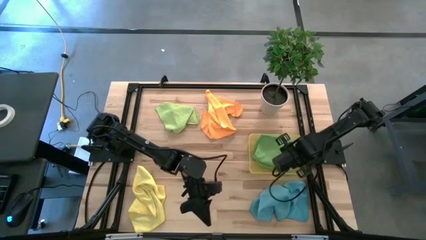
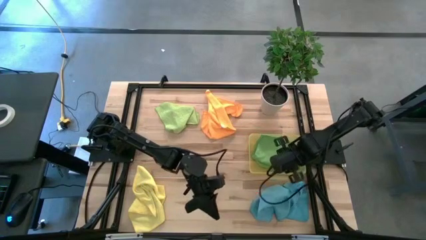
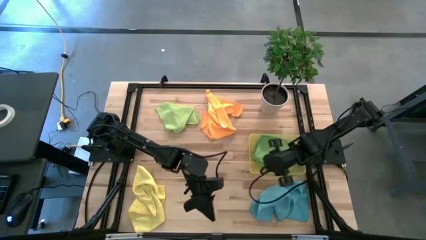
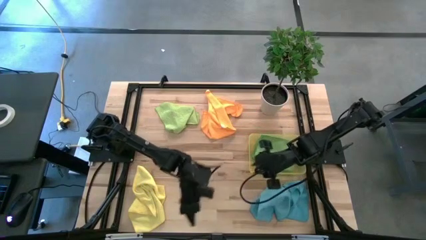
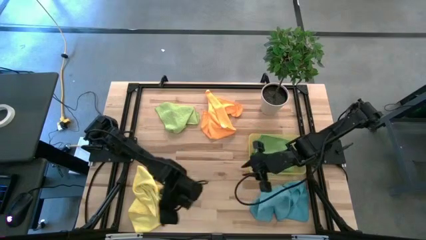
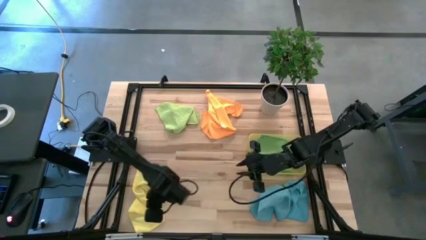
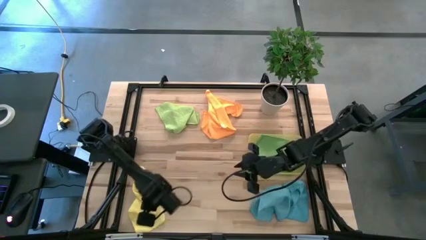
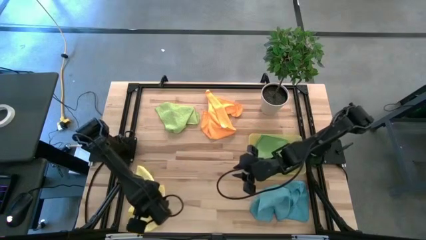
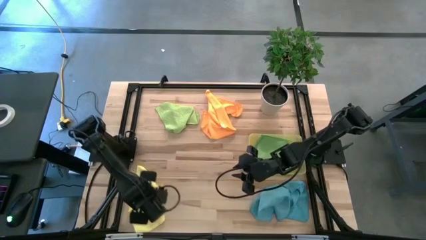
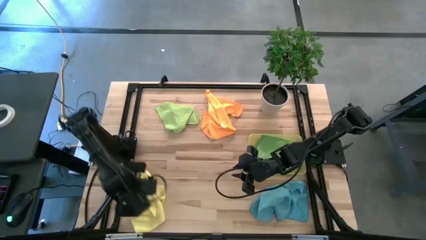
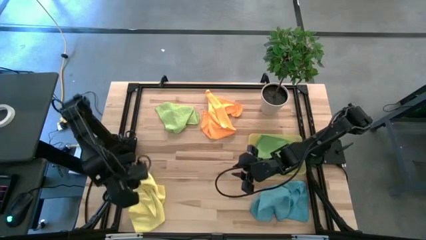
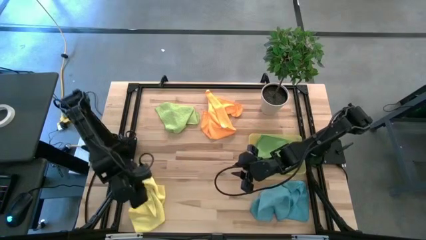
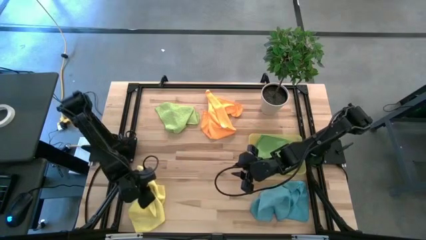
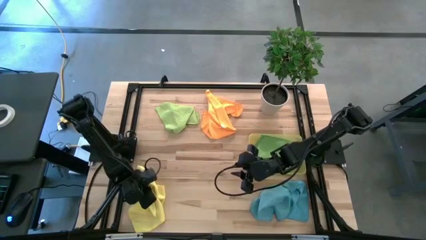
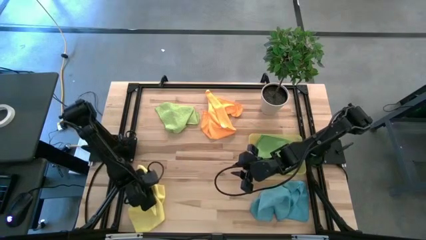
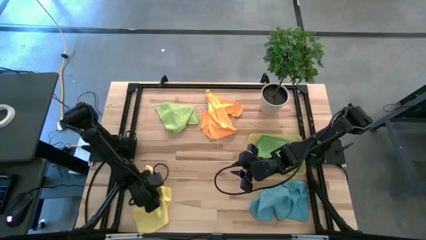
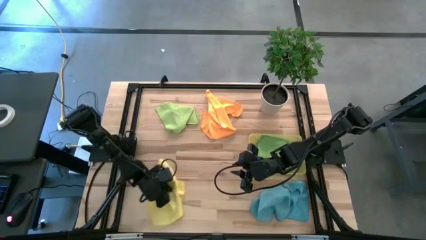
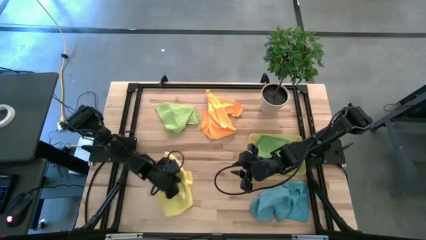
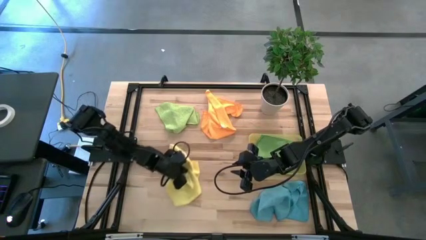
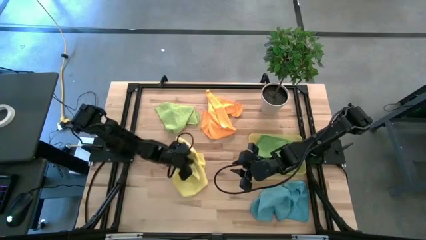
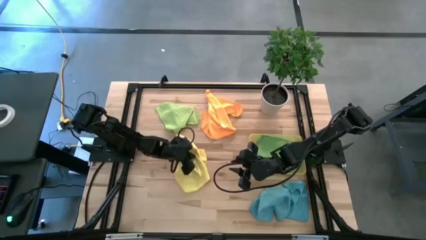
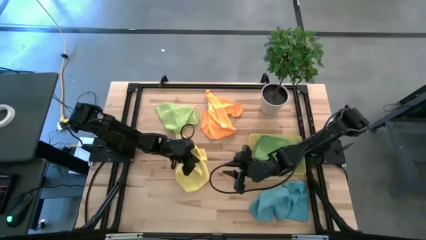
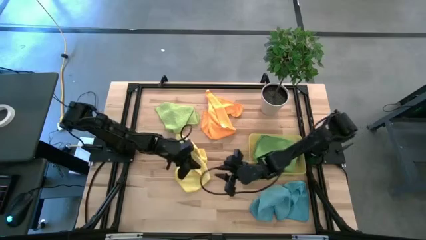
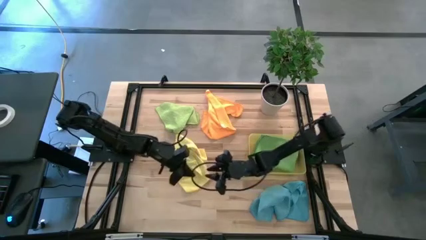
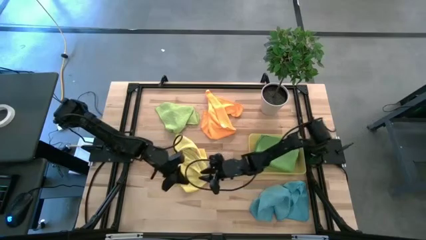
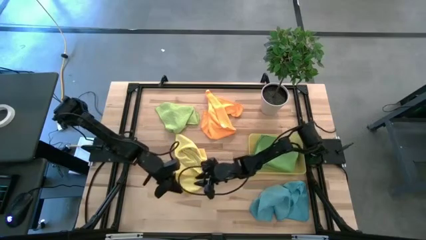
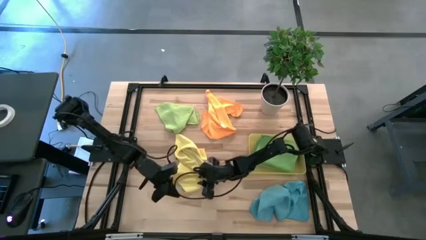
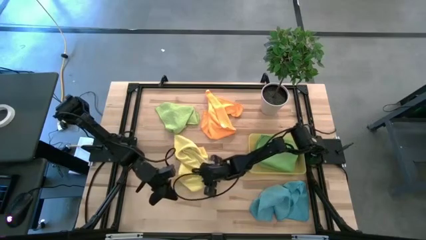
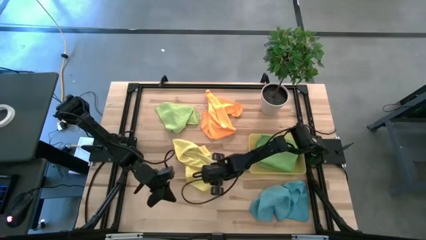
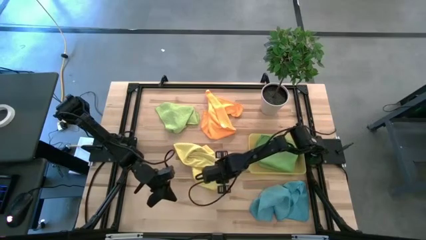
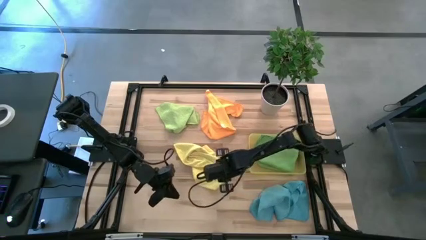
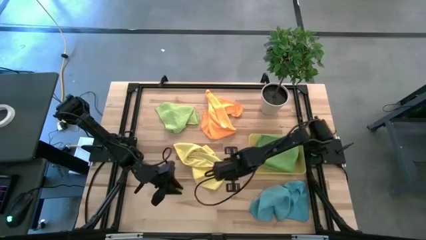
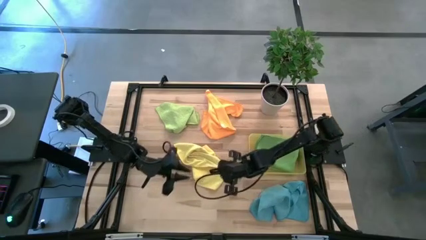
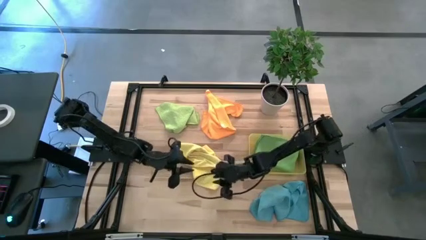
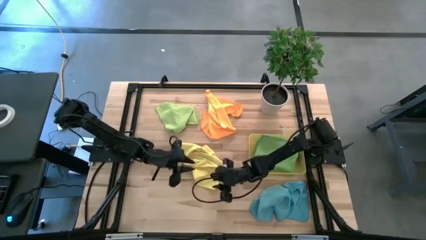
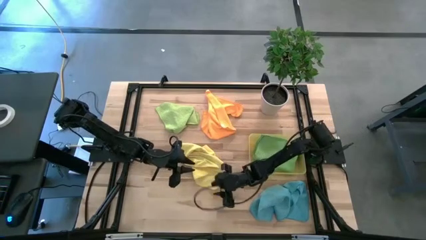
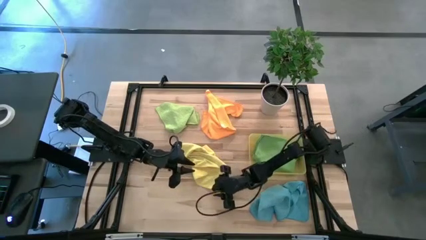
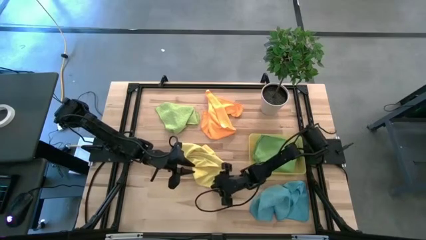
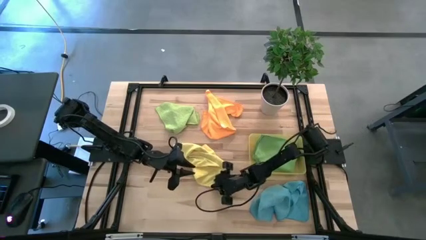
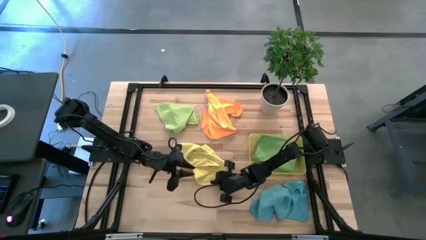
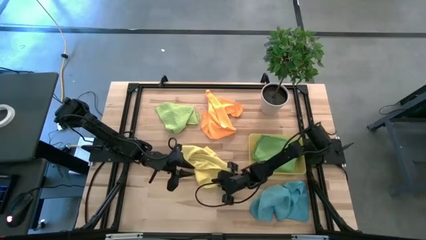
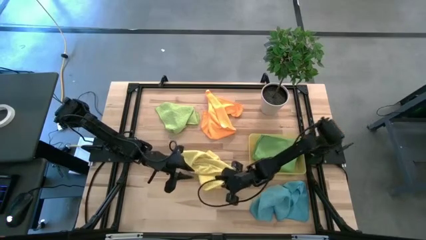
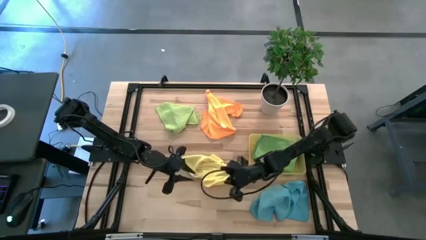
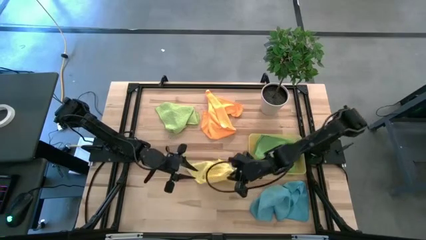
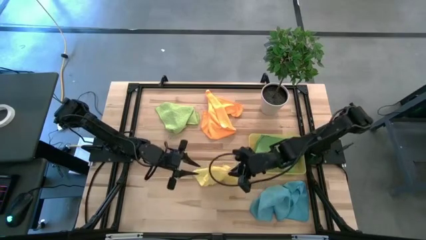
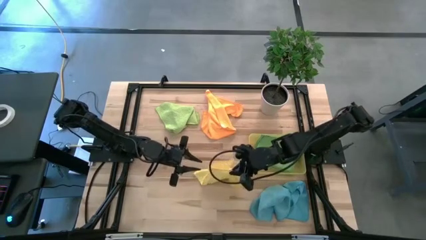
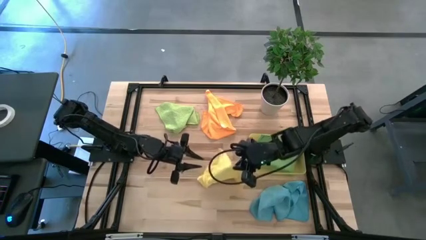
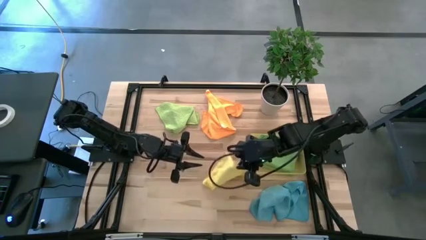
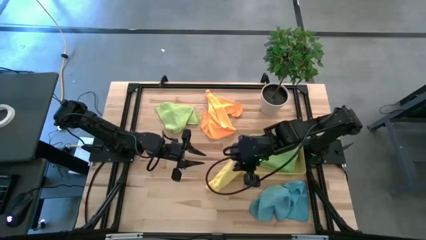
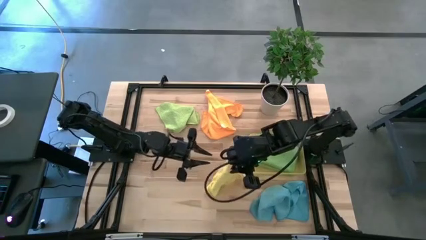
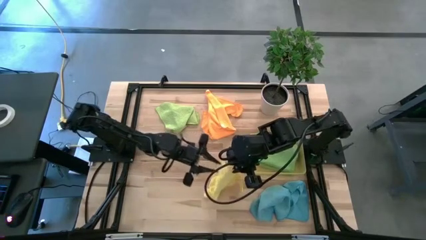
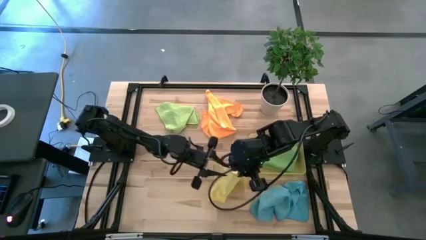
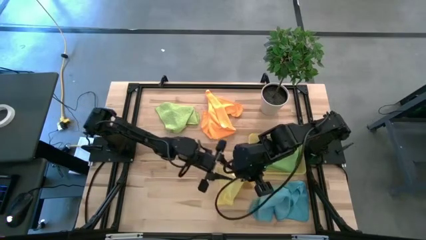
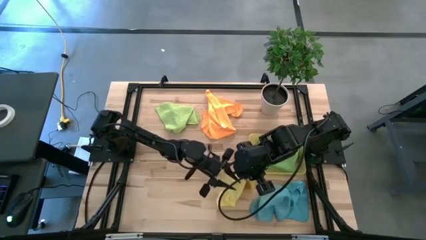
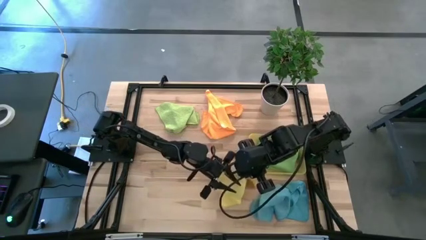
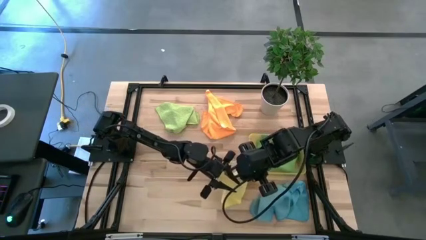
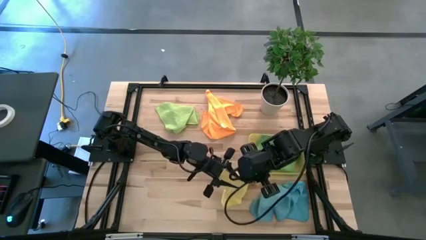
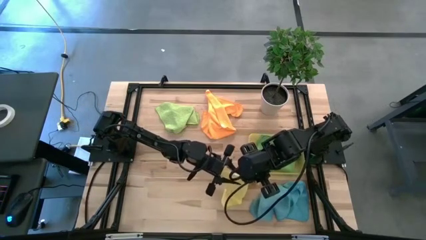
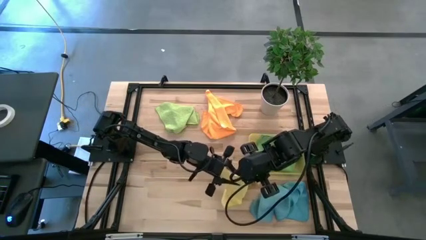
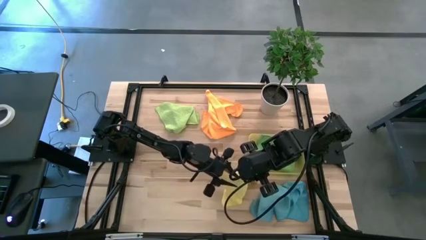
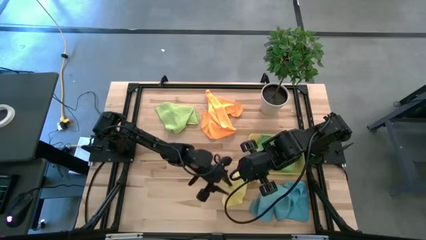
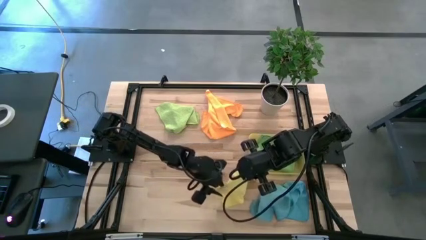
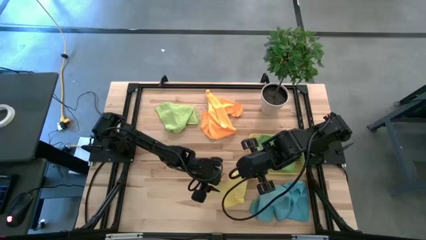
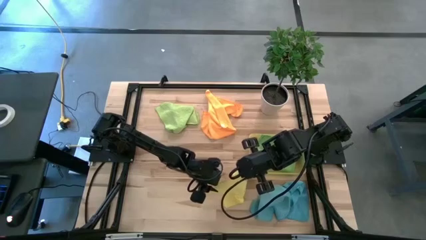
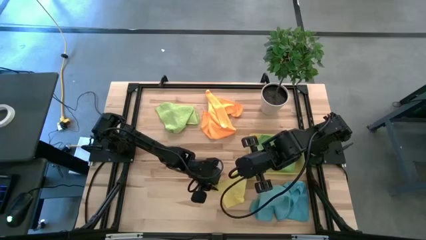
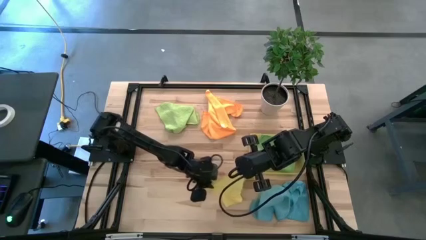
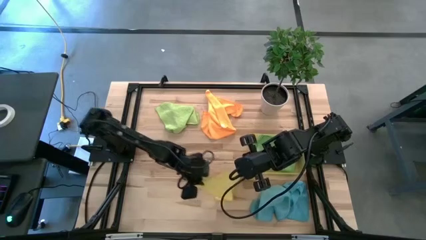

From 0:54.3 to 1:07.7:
Task: Fold microfiber towels
Fold the yellow microfiber cloth
